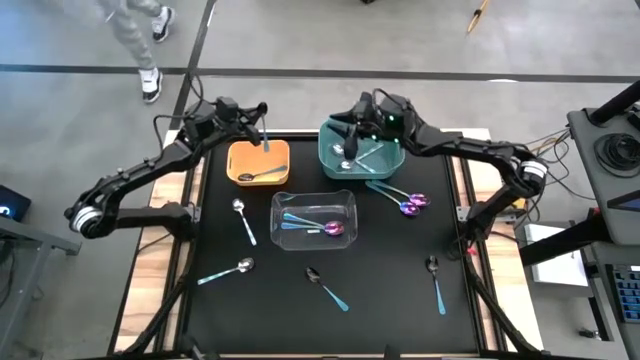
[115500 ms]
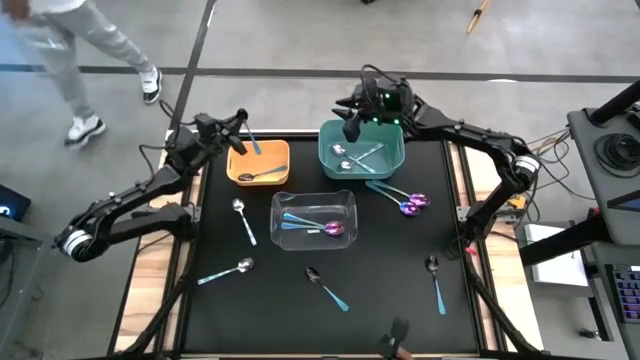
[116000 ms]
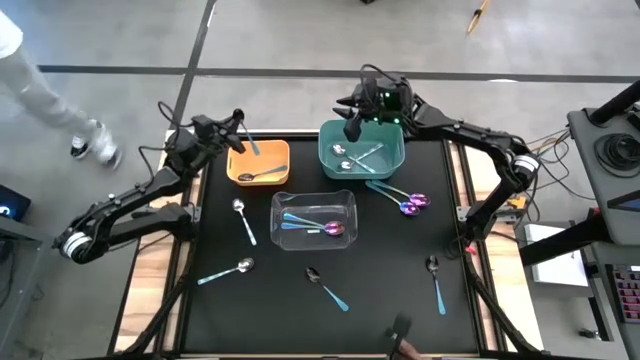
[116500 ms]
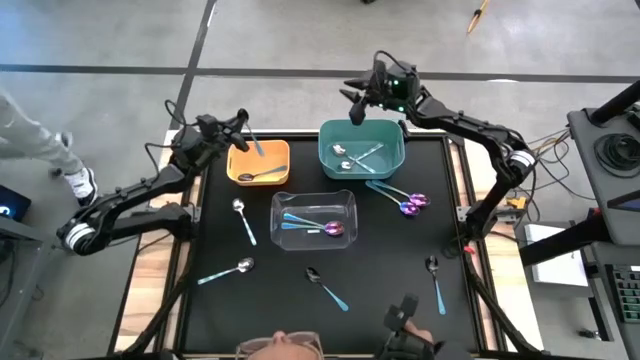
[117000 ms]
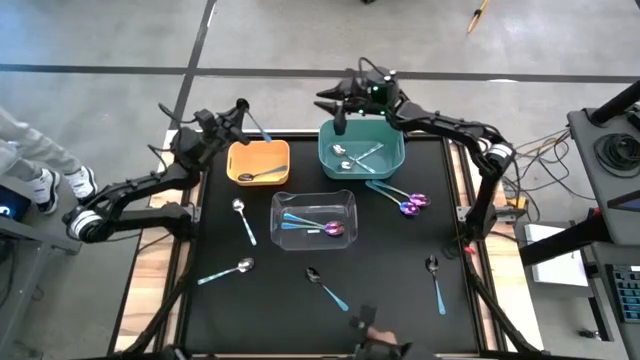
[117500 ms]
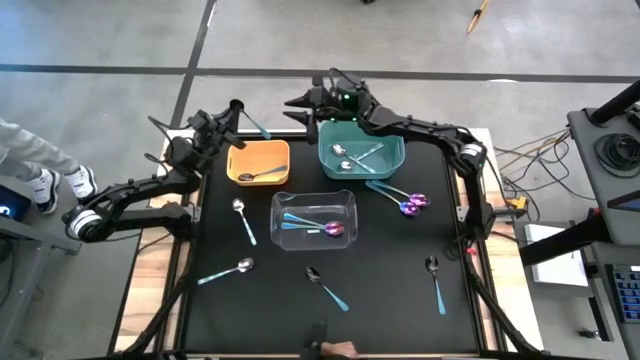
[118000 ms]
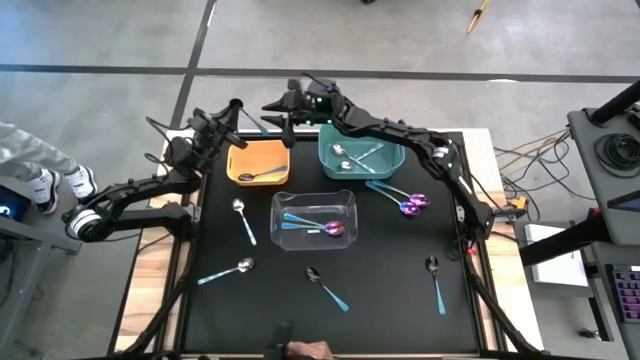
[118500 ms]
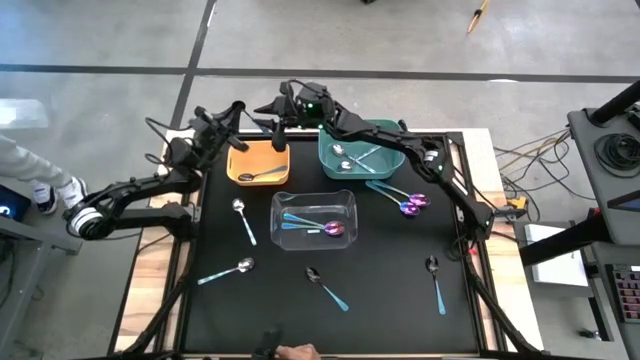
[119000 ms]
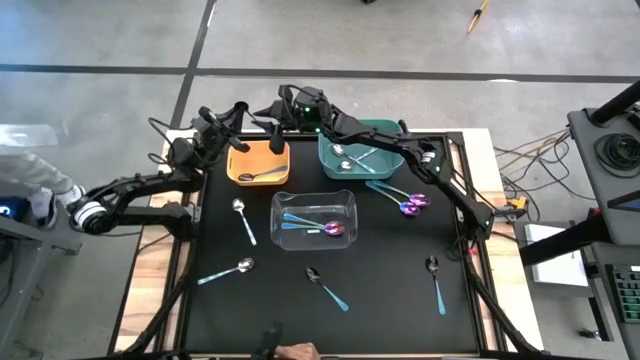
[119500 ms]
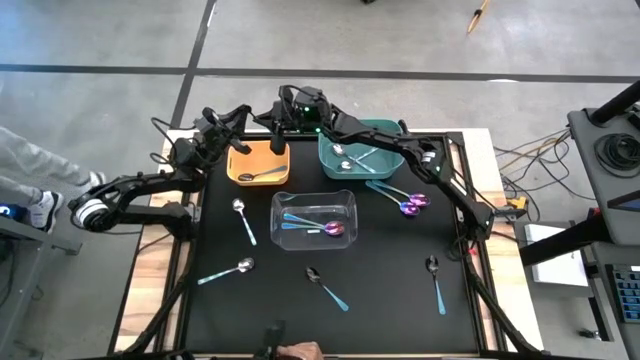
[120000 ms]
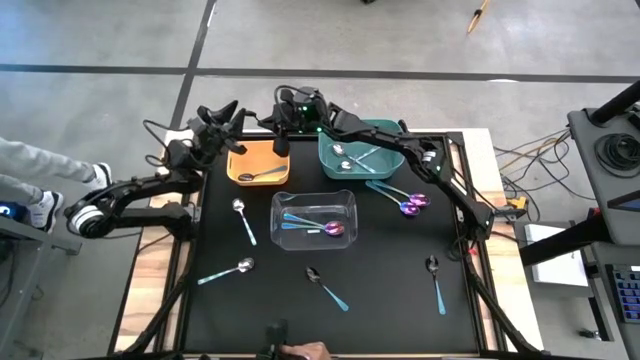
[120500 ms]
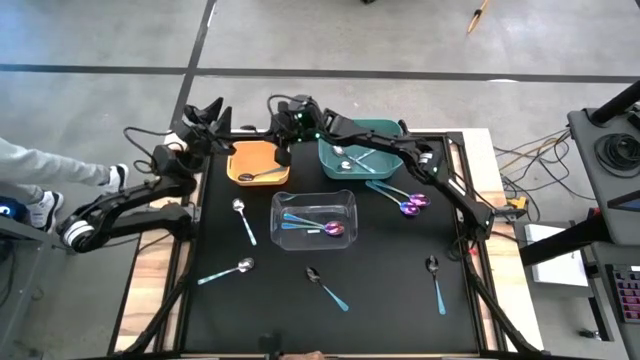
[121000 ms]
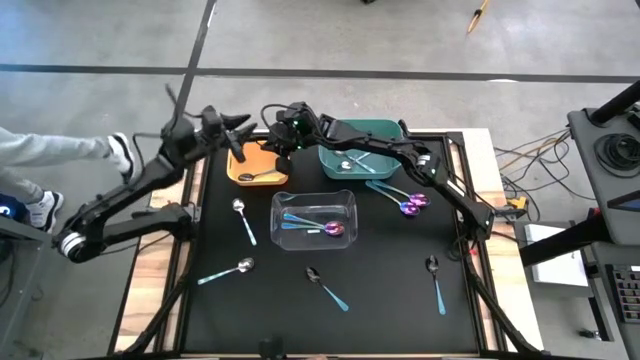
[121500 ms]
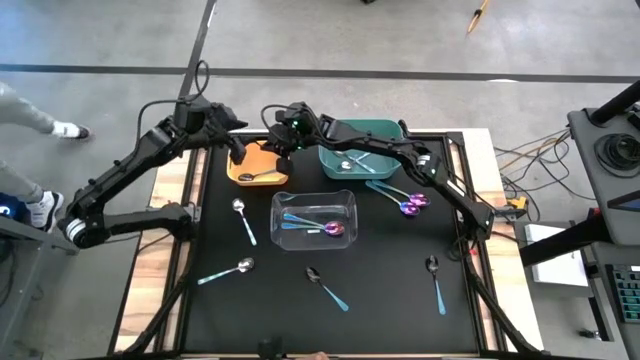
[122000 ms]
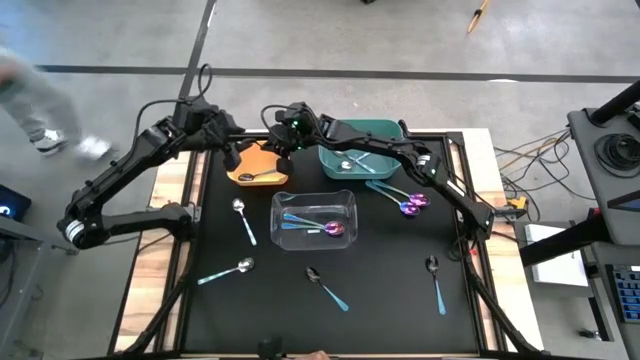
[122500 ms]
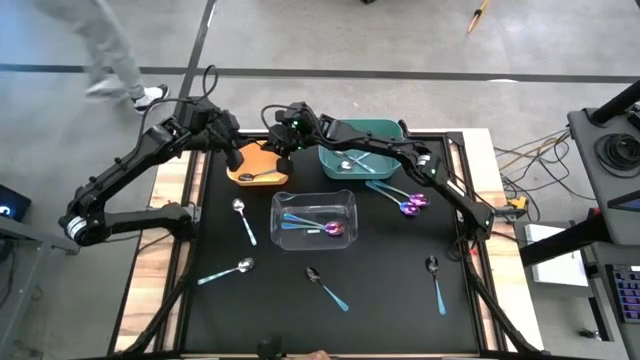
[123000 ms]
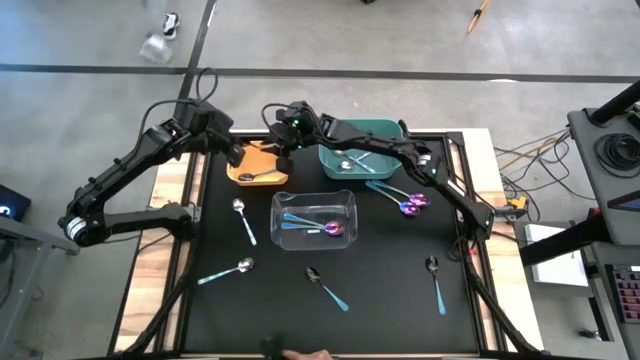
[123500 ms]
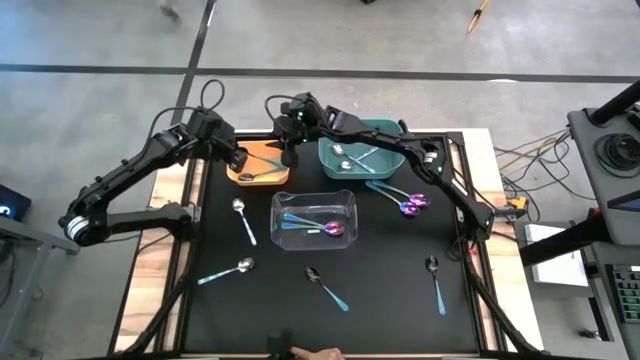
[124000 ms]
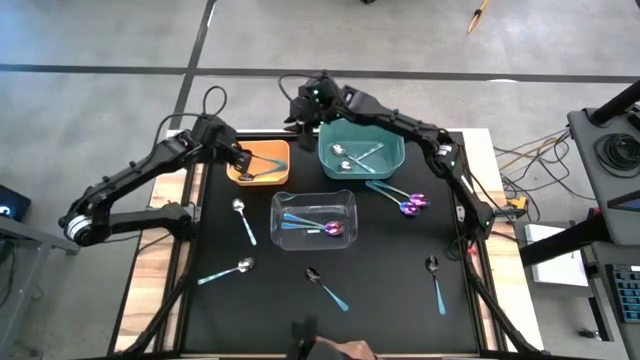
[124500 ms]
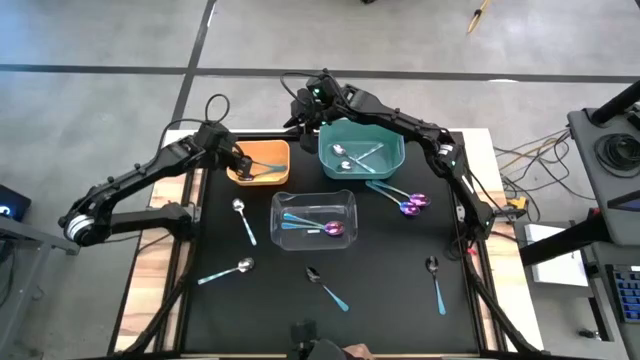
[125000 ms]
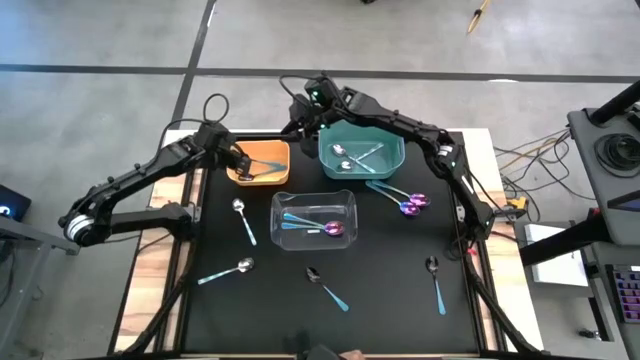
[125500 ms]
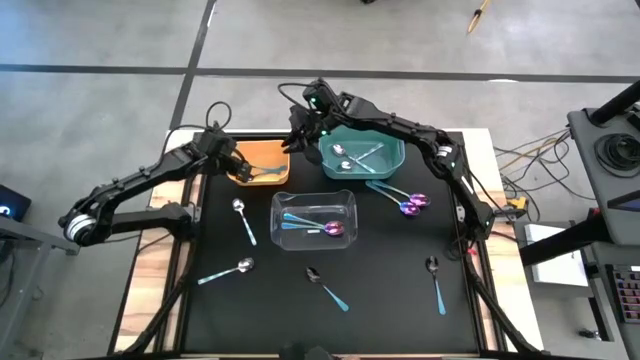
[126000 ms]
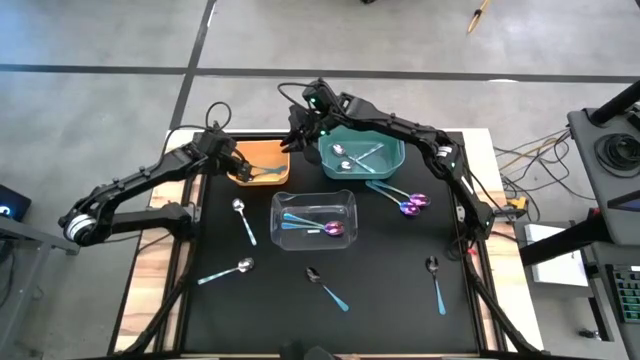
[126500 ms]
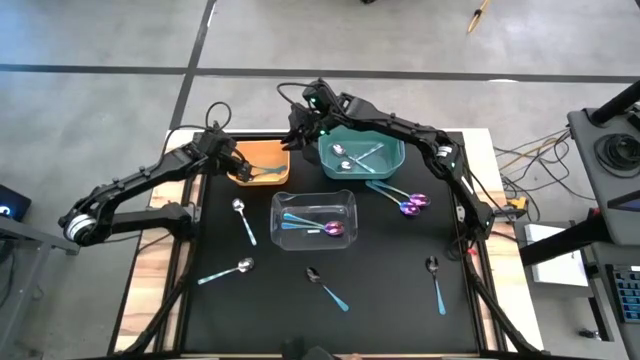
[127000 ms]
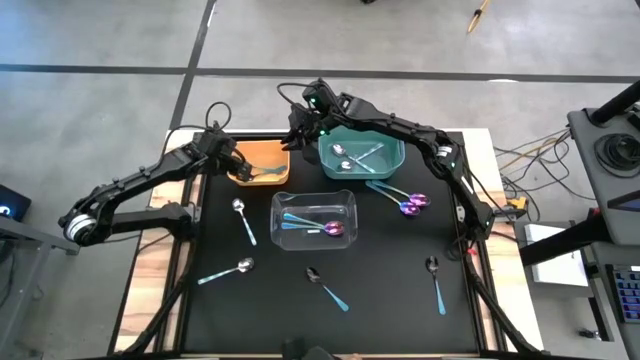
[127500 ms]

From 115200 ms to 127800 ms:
Task: Sort silverware by color (type)
Put the blue spoon into the yellow bin

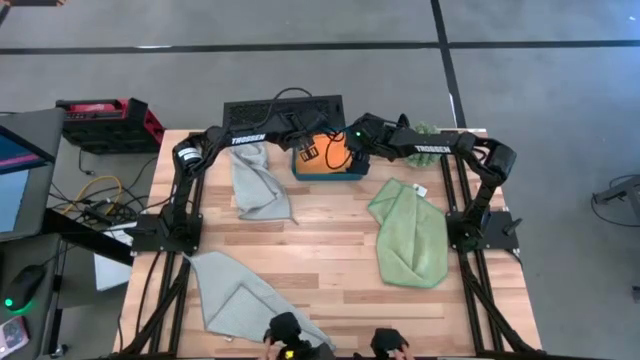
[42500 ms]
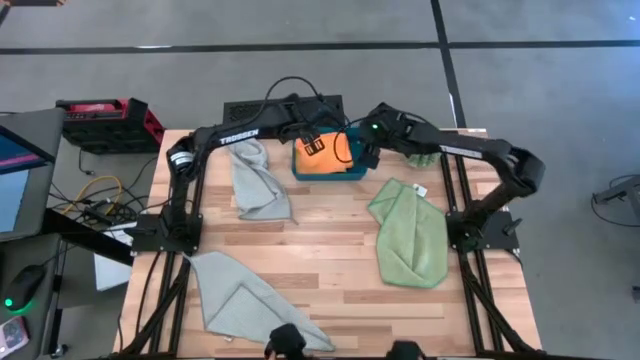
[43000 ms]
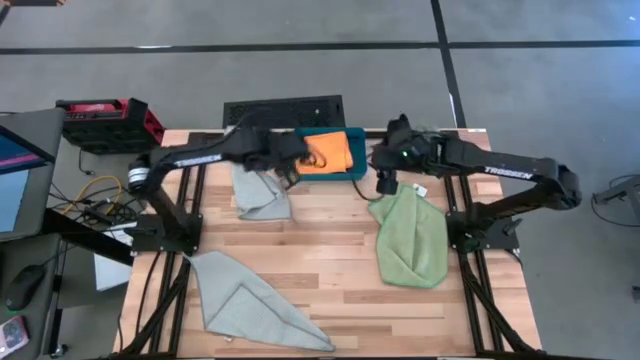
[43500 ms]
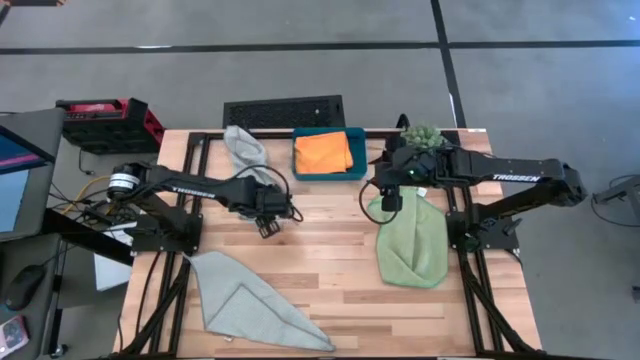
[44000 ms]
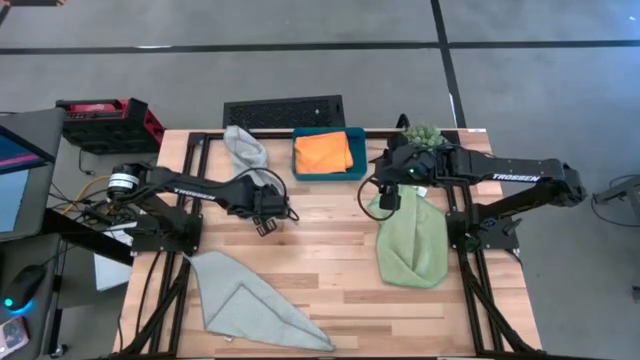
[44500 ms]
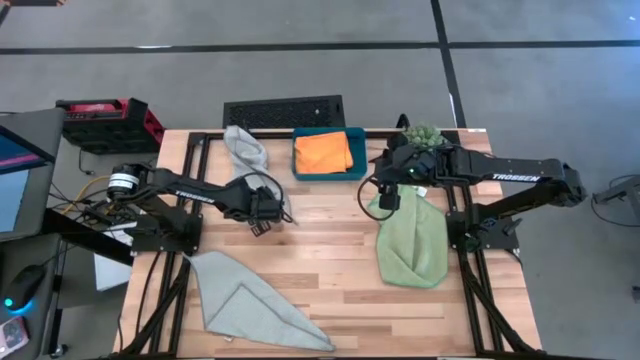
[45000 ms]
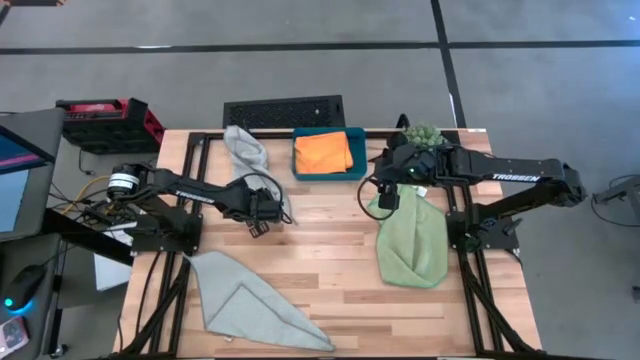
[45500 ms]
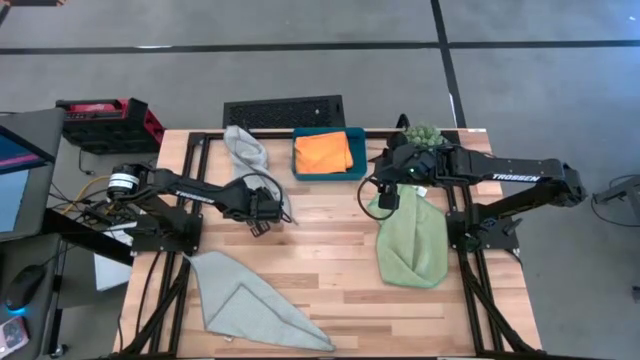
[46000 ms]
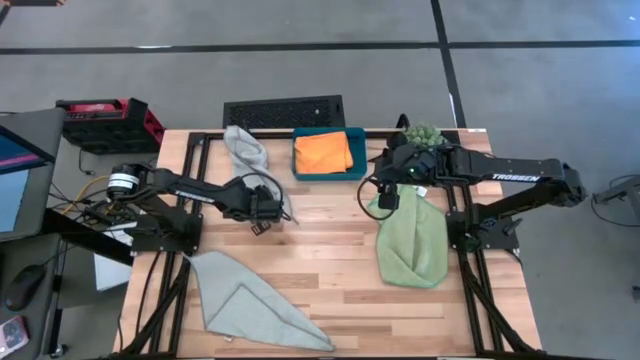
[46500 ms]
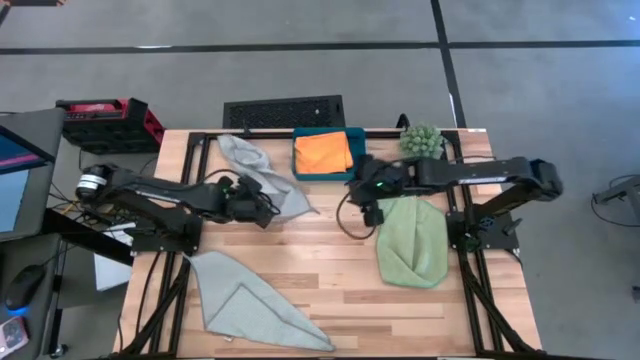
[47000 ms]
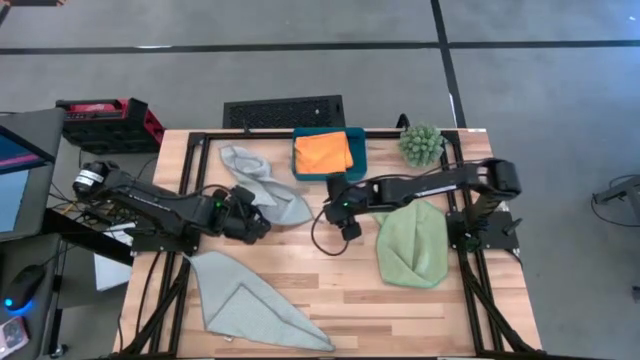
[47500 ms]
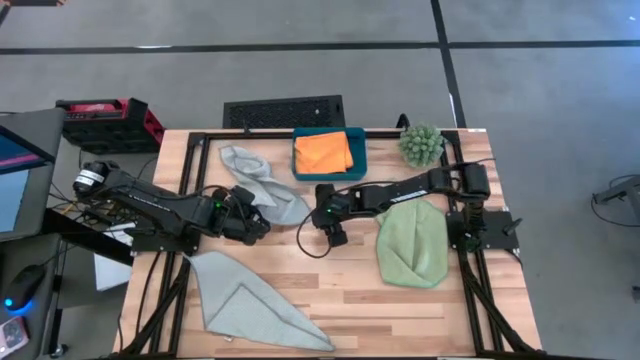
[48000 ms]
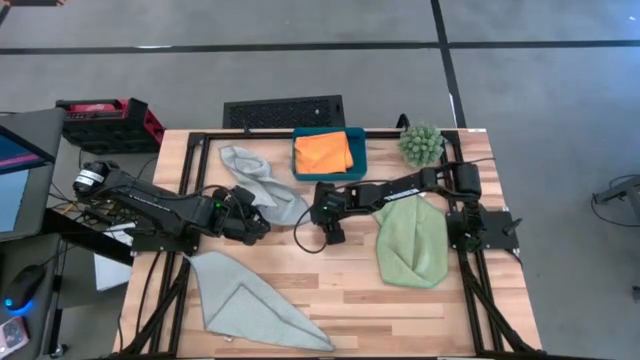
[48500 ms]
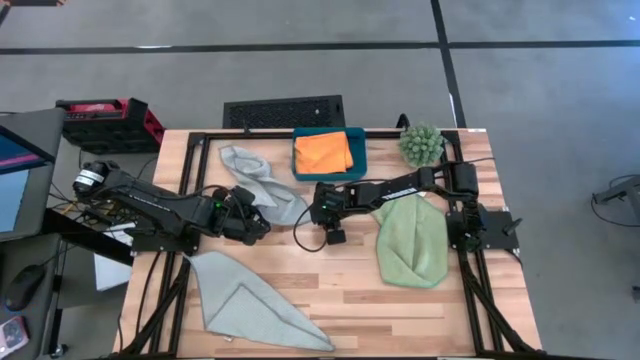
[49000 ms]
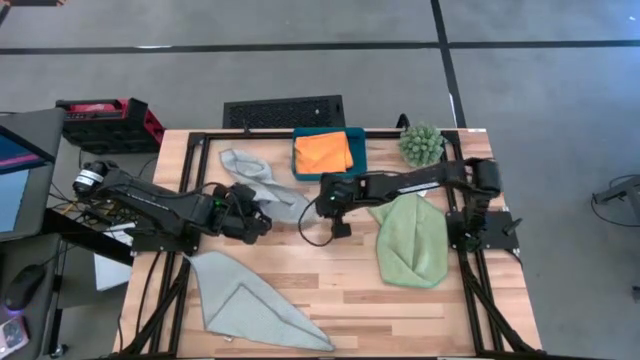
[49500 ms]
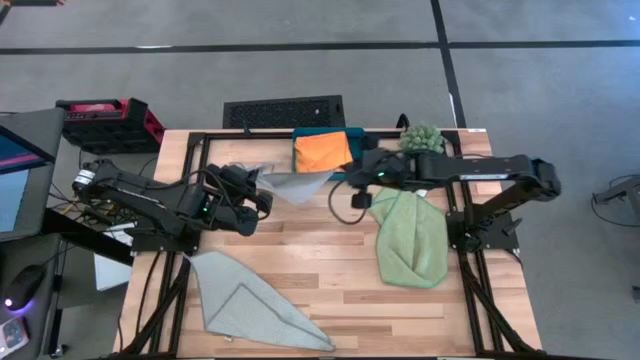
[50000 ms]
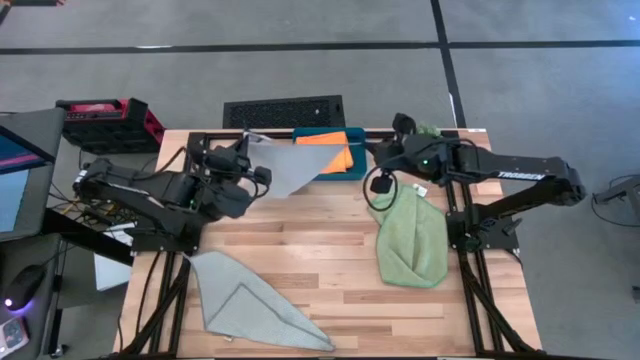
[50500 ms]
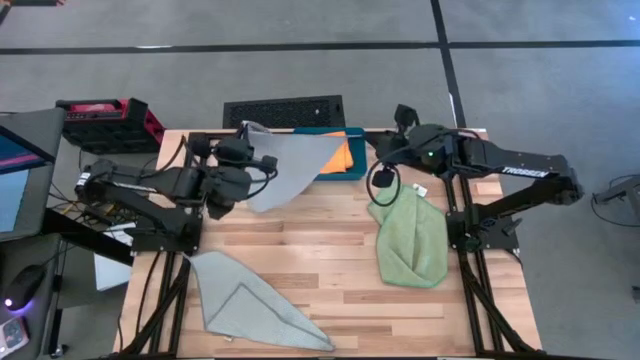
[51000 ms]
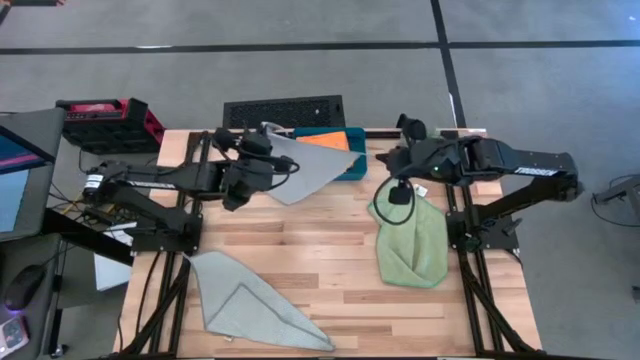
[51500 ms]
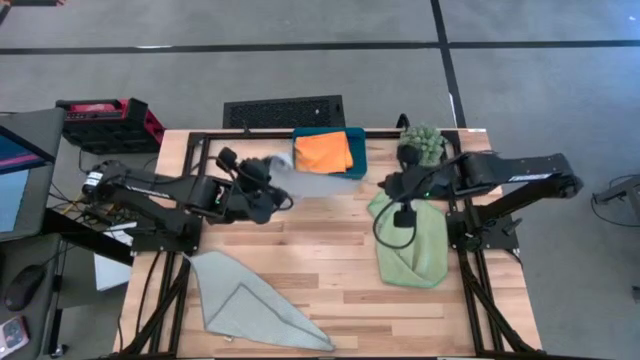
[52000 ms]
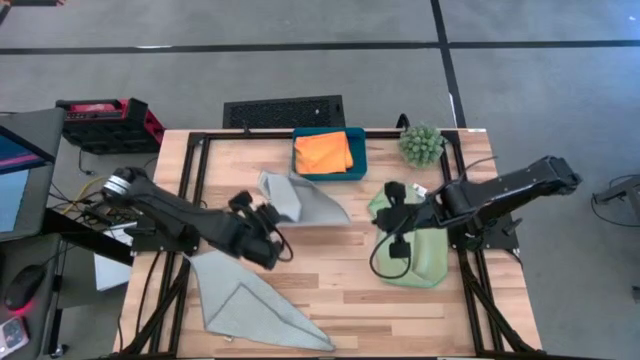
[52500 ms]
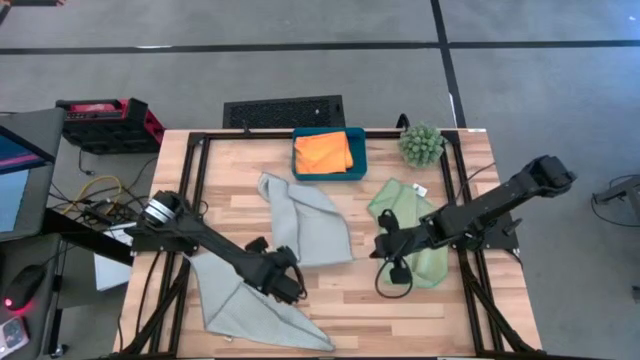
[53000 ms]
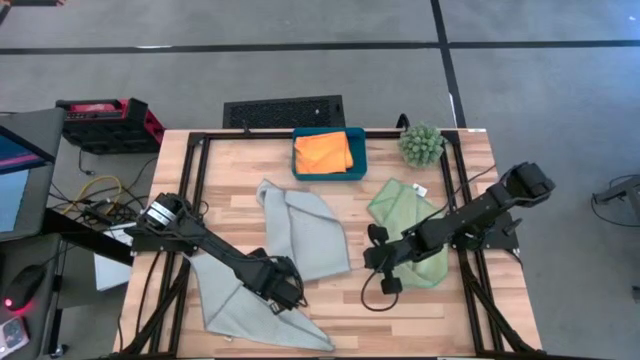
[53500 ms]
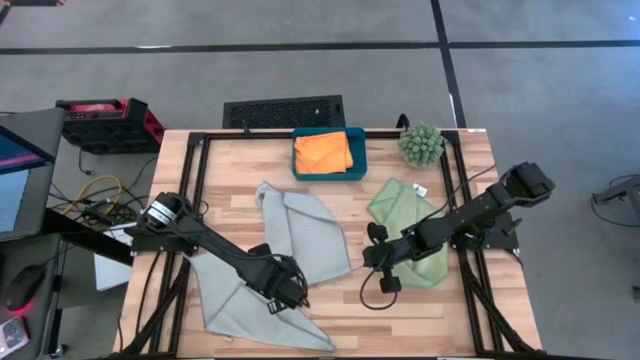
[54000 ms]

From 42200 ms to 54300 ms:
Task: Fold microfiber towels
Fold the top gray microfiber cloth
